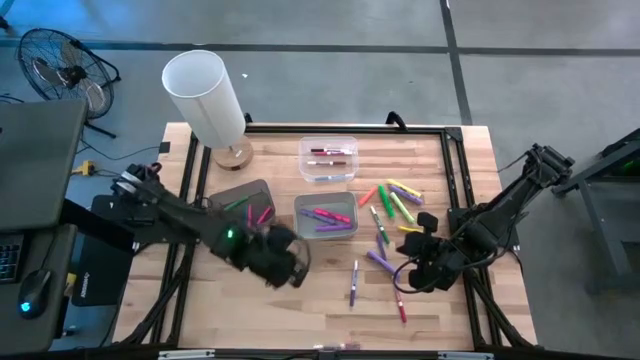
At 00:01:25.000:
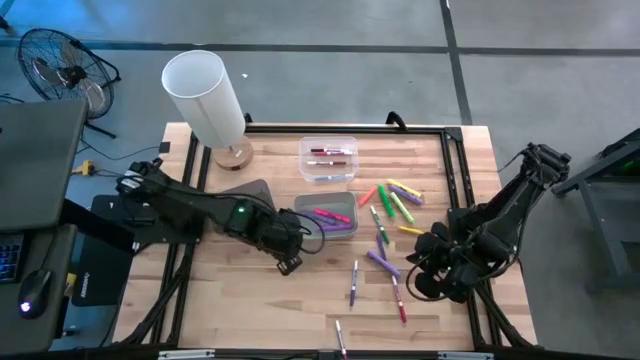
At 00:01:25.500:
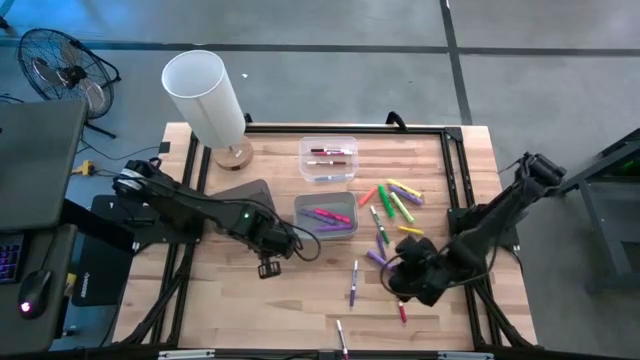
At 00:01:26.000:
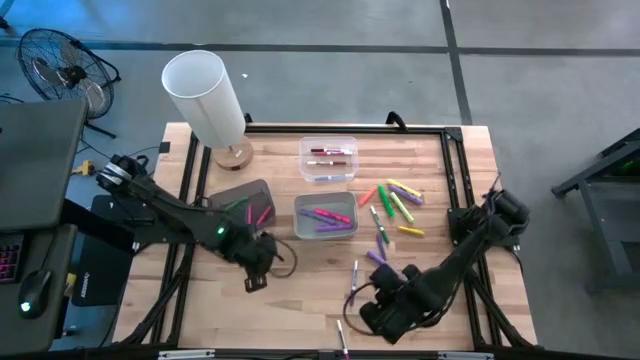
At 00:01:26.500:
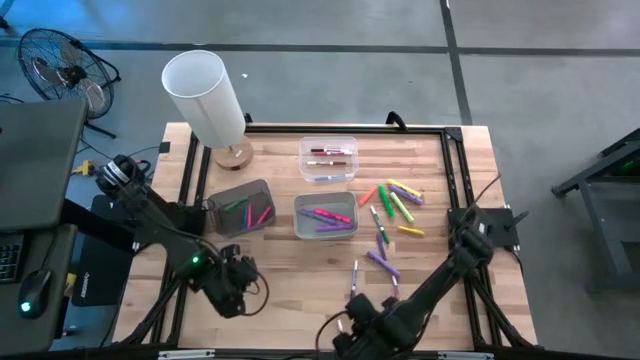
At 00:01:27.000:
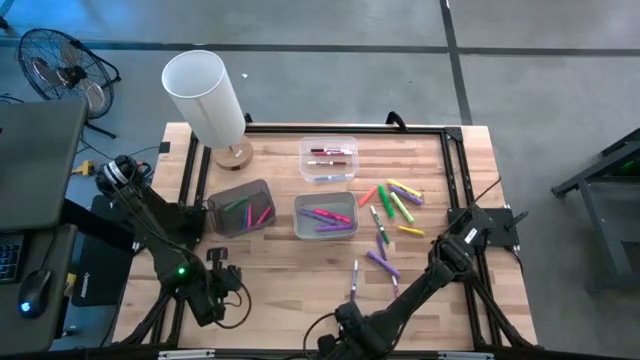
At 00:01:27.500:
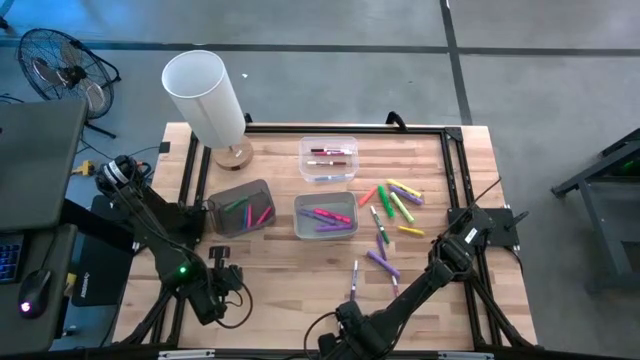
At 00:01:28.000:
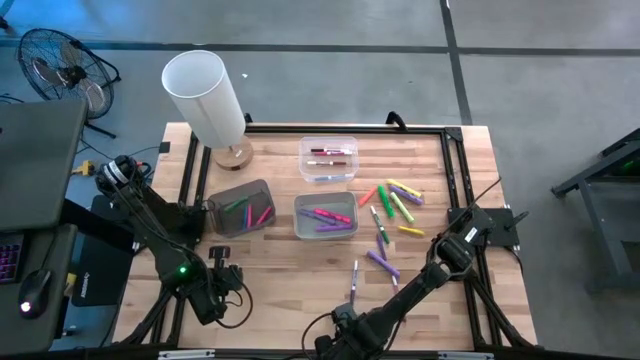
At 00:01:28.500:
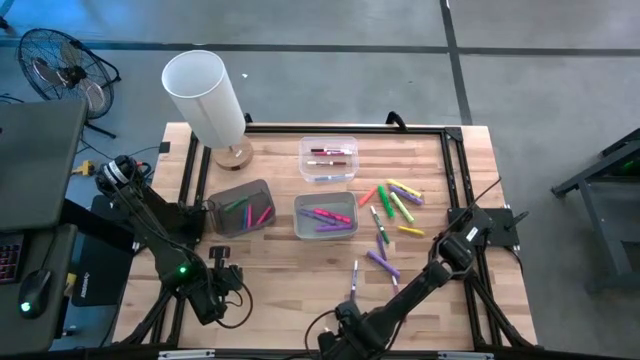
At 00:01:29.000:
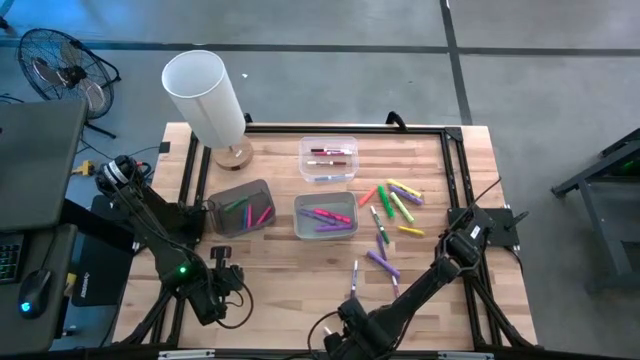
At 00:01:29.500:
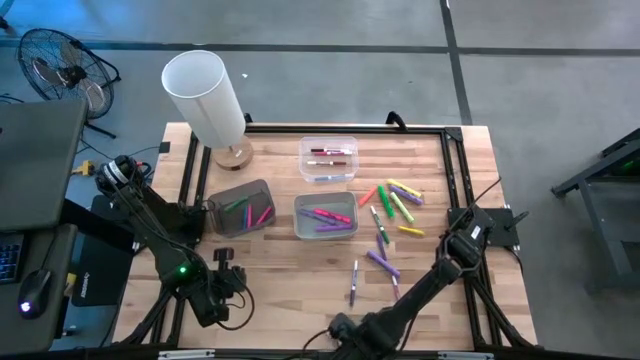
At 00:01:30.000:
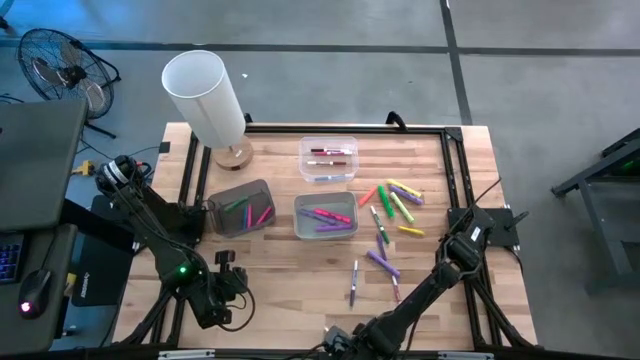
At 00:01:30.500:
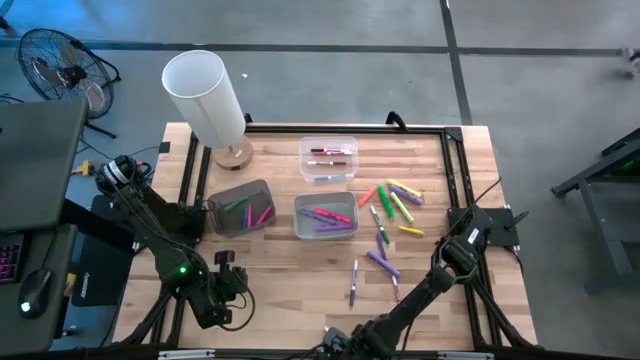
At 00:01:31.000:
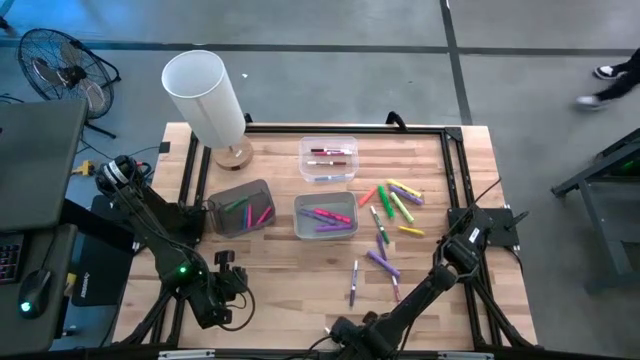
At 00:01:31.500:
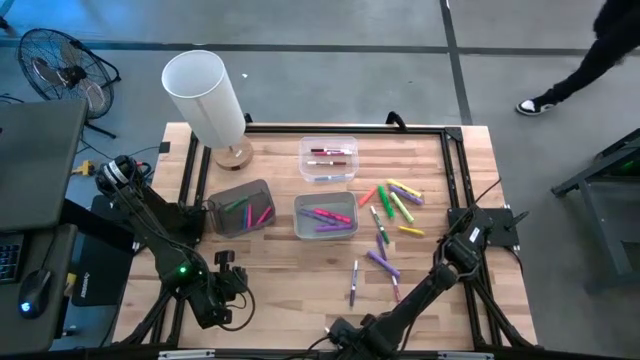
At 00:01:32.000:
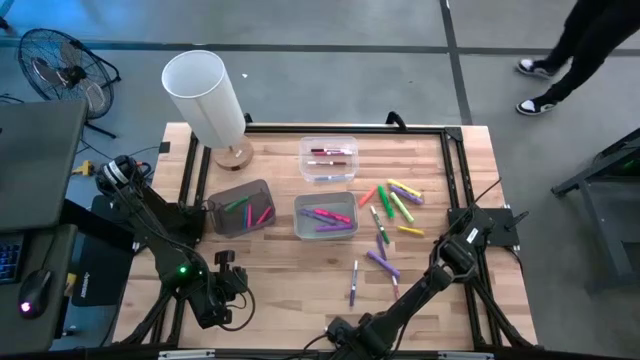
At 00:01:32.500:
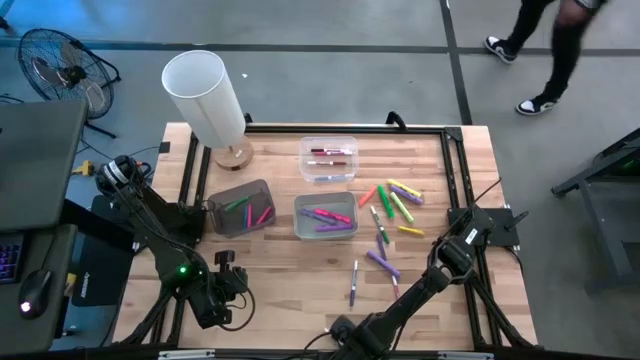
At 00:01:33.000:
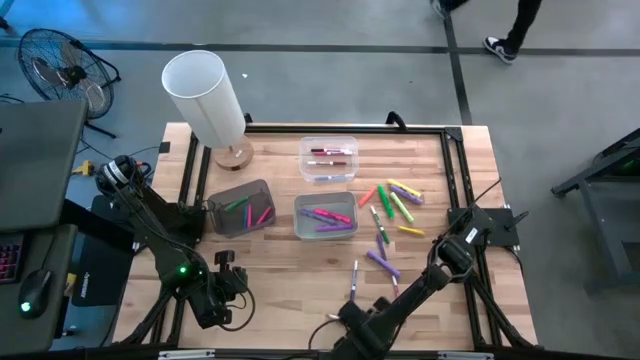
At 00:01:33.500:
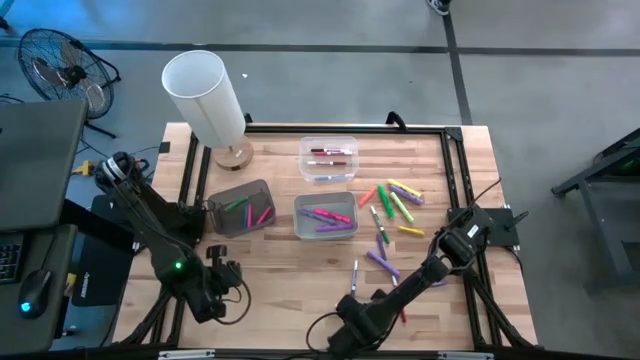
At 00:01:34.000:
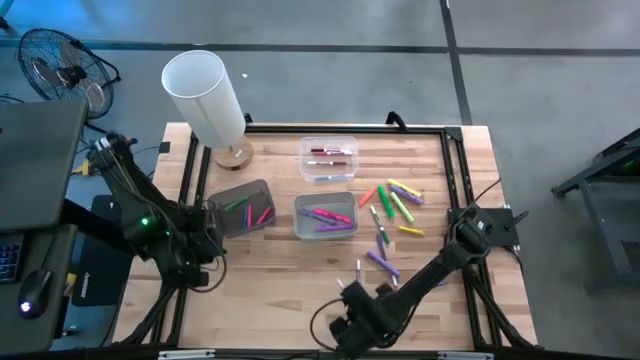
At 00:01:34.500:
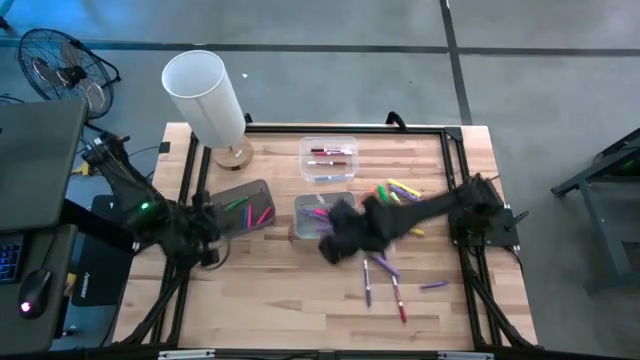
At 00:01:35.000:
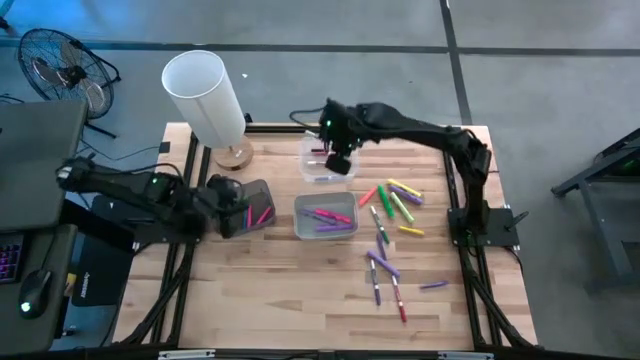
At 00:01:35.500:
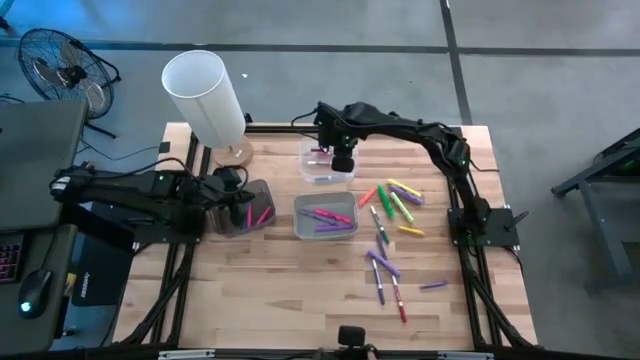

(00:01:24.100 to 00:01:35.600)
Task: Pick & Place Markers
Put the violet marker pen into the transparent bin

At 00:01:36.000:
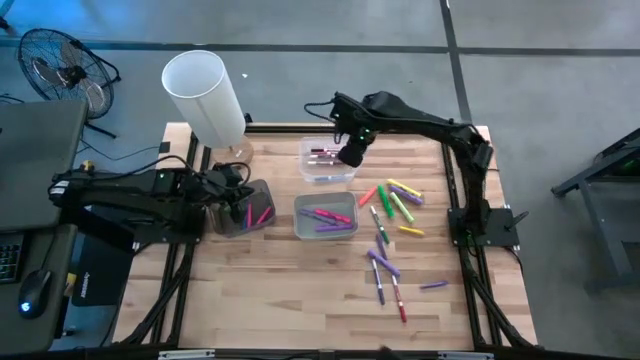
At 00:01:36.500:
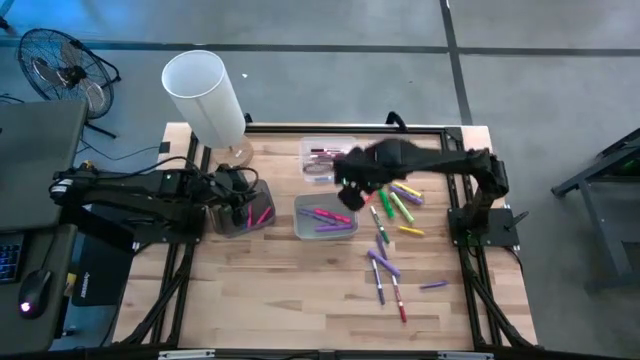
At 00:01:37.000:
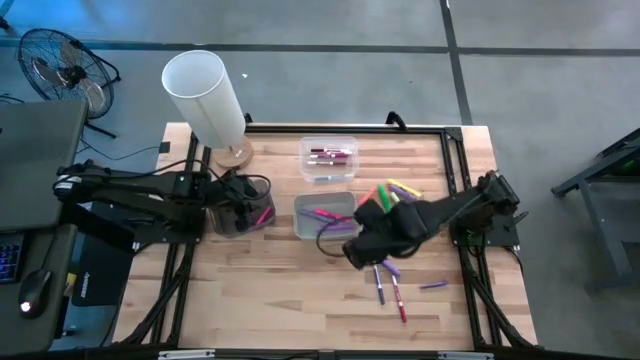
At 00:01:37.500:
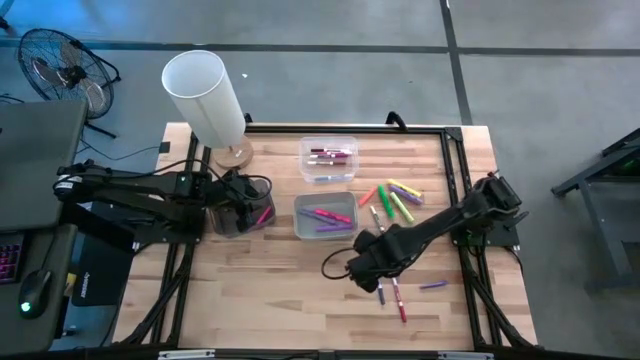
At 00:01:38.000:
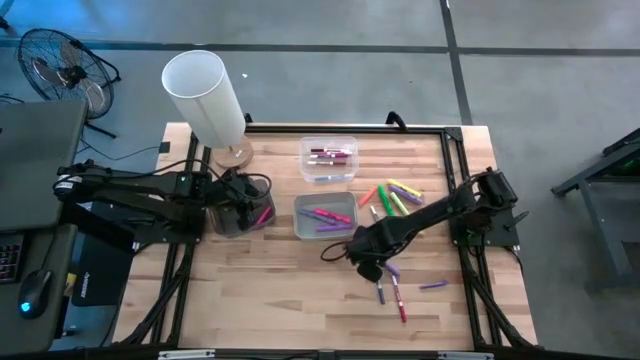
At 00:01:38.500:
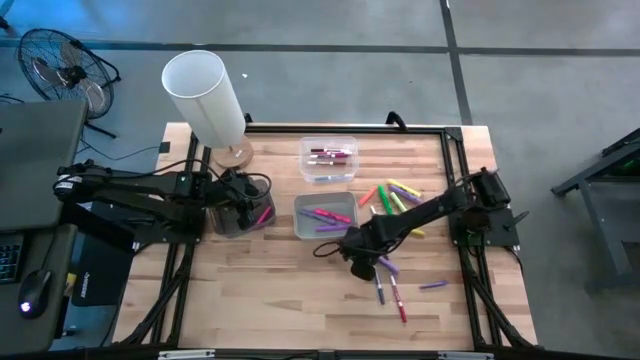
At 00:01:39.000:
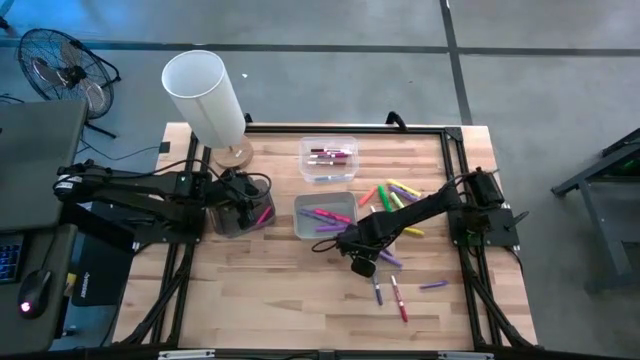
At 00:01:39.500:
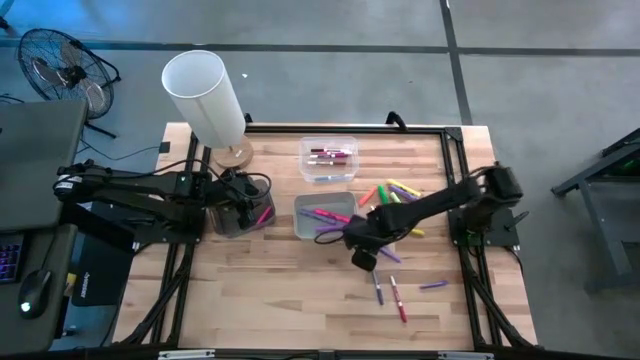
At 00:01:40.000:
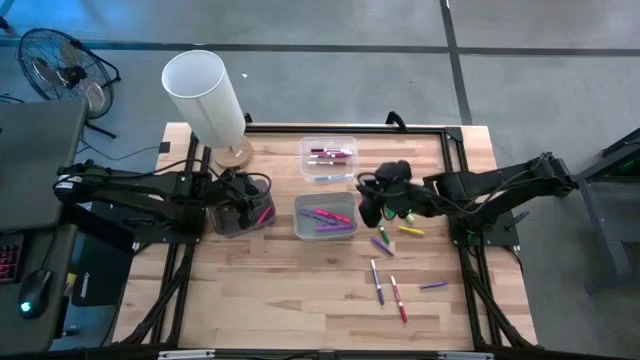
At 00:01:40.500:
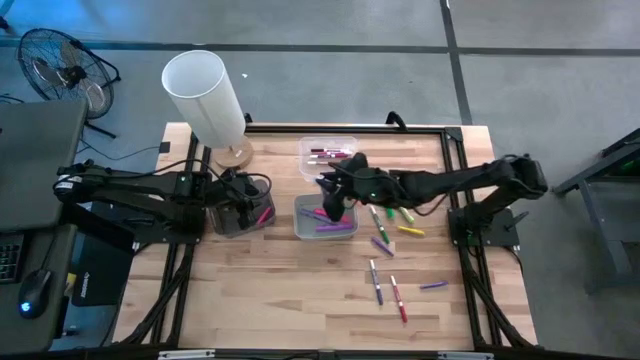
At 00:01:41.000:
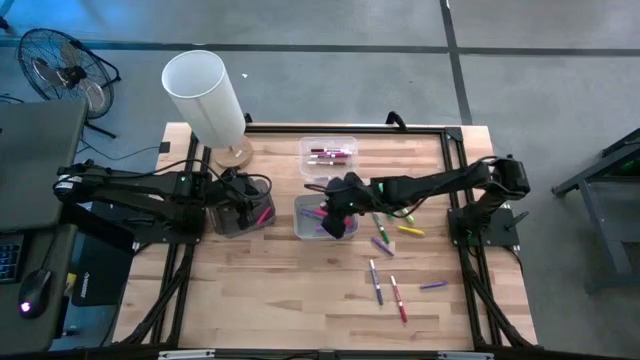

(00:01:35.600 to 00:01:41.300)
Put the purple highlighter pen into the white bin

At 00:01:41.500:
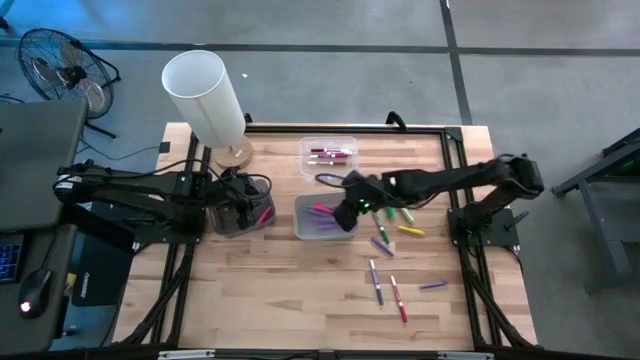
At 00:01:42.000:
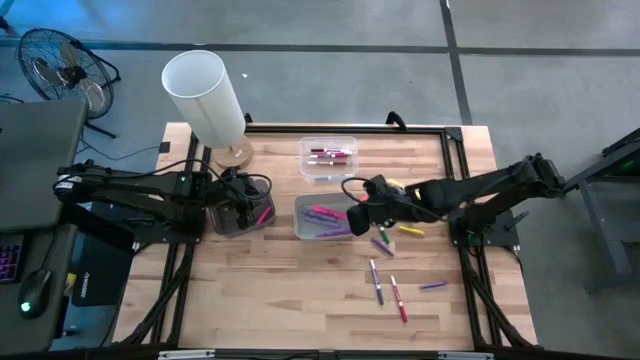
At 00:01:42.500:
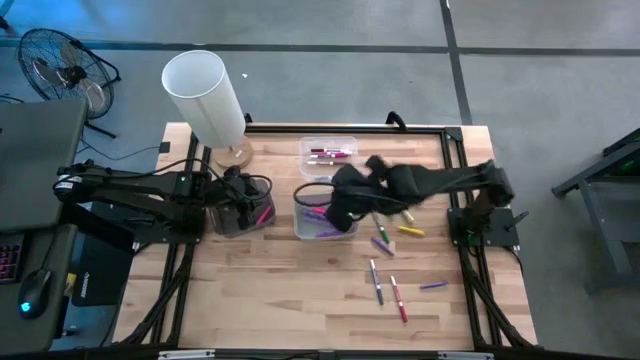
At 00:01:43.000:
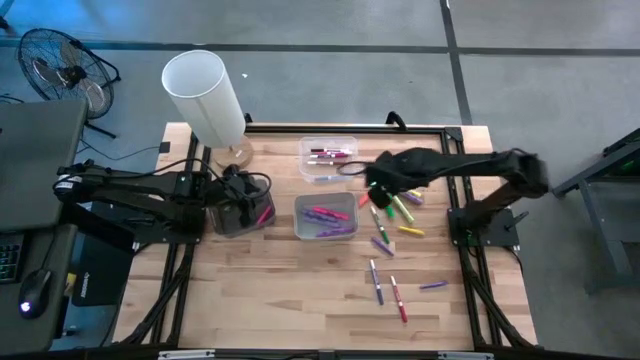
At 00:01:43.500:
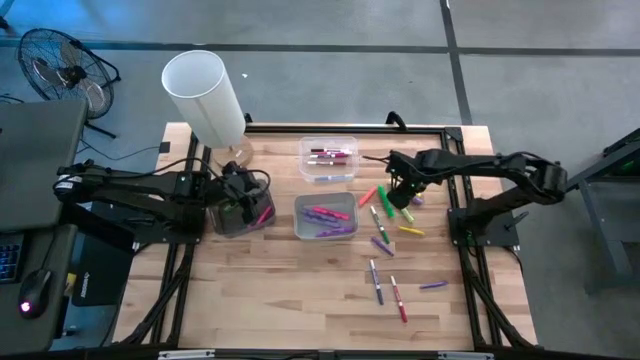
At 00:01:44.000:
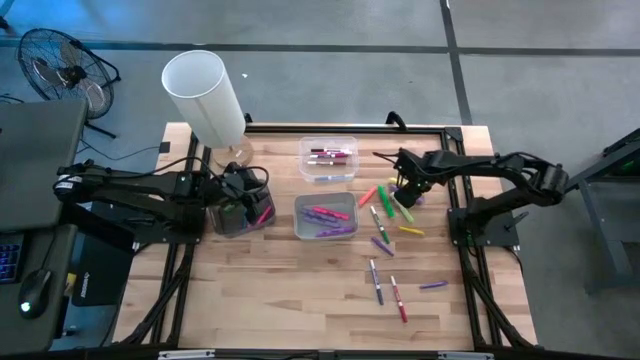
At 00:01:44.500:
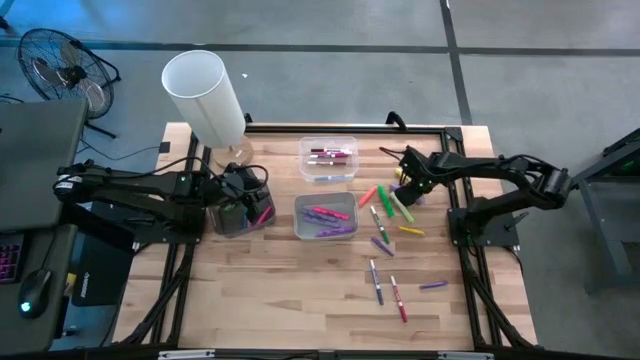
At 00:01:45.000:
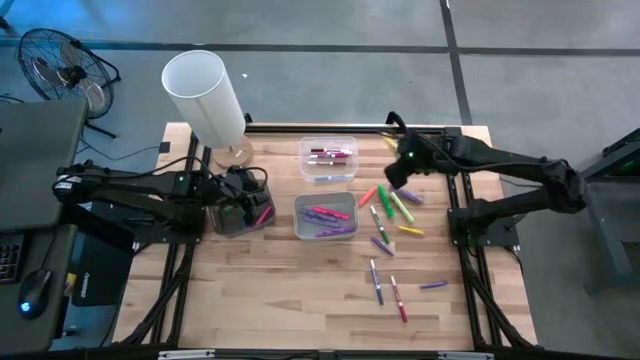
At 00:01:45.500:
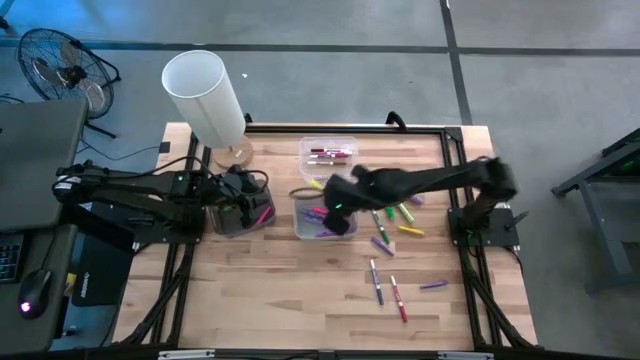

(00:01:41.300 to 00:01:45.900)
Put the yellow highlighter pen into the white bin
